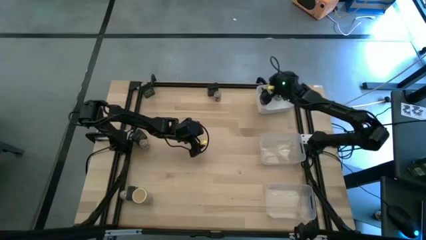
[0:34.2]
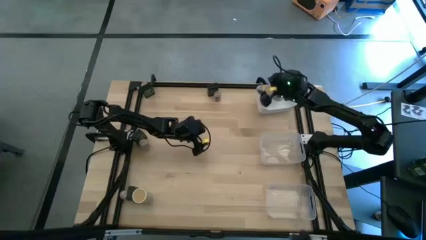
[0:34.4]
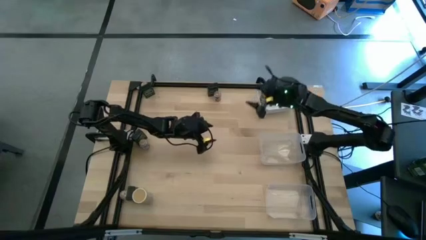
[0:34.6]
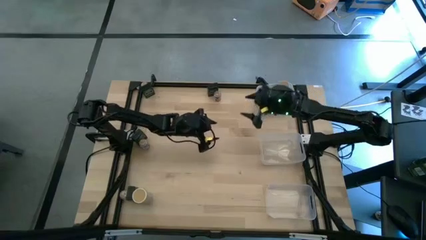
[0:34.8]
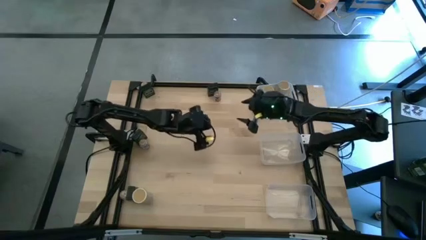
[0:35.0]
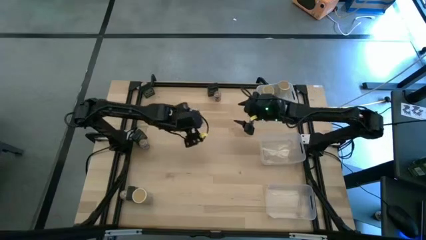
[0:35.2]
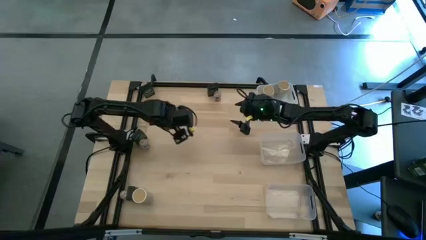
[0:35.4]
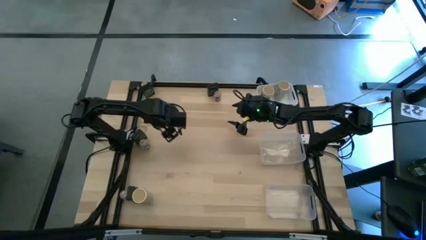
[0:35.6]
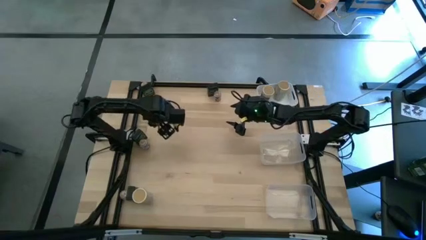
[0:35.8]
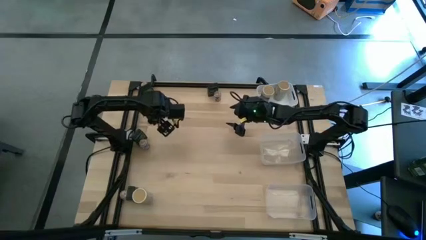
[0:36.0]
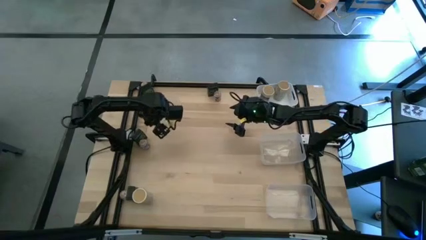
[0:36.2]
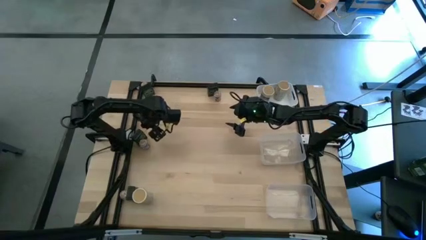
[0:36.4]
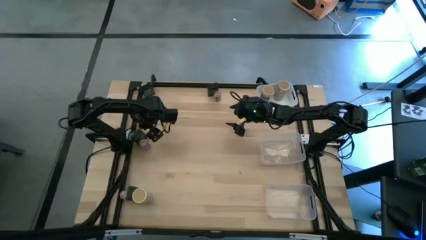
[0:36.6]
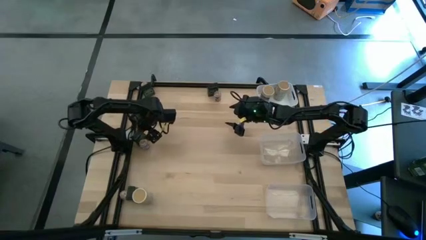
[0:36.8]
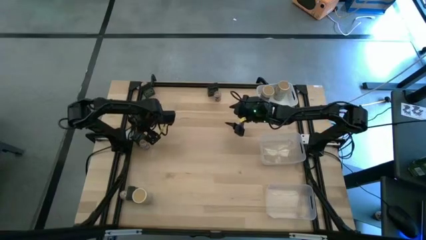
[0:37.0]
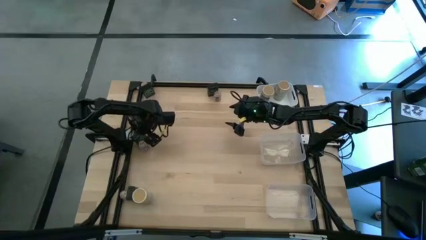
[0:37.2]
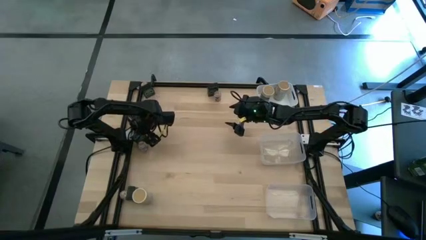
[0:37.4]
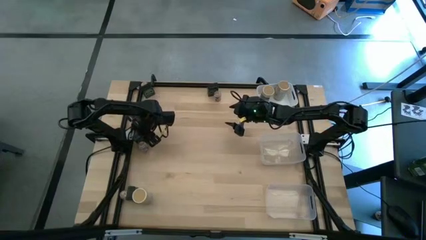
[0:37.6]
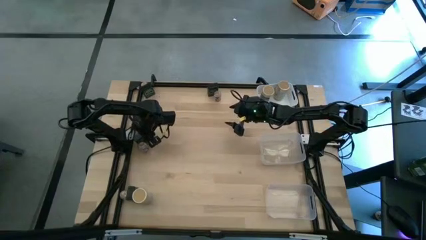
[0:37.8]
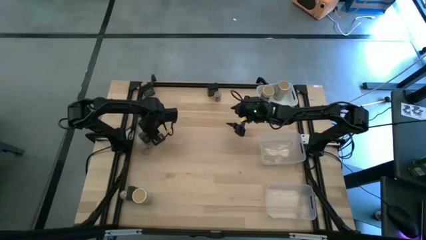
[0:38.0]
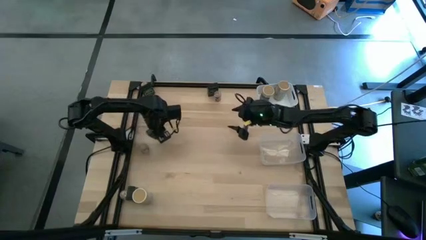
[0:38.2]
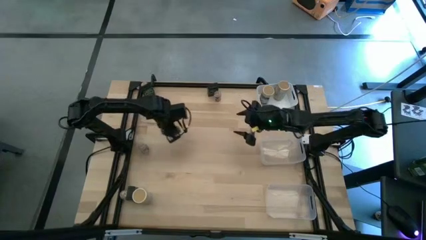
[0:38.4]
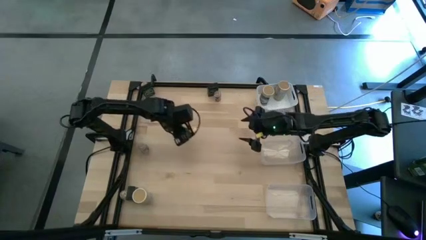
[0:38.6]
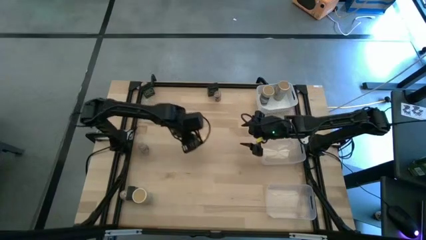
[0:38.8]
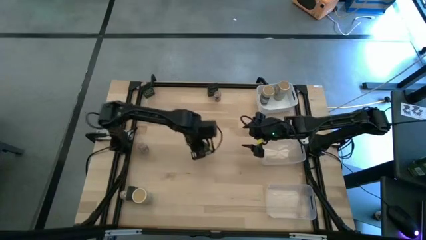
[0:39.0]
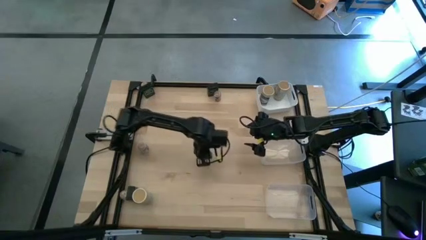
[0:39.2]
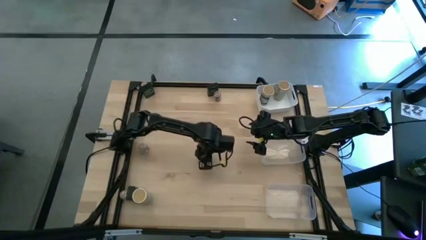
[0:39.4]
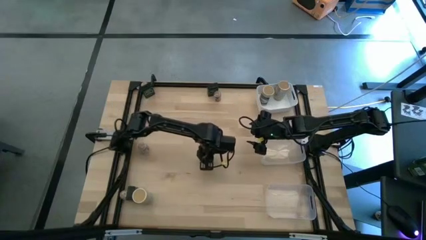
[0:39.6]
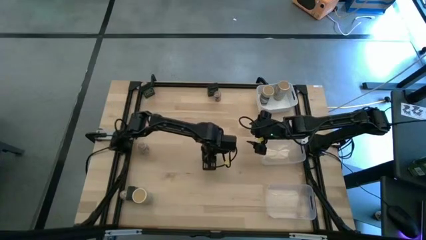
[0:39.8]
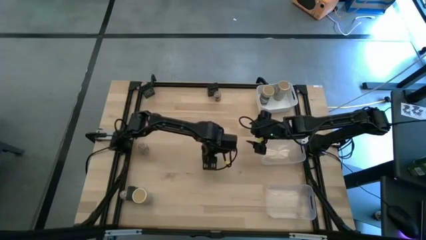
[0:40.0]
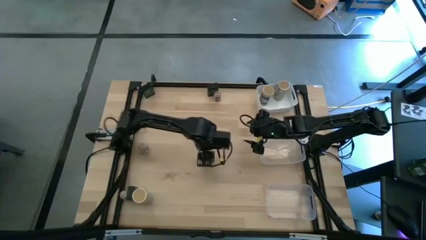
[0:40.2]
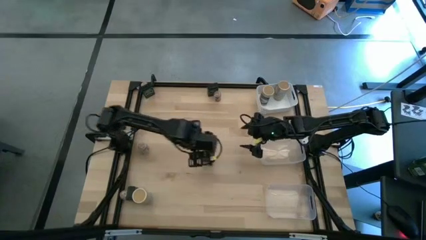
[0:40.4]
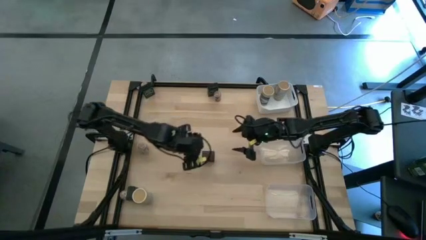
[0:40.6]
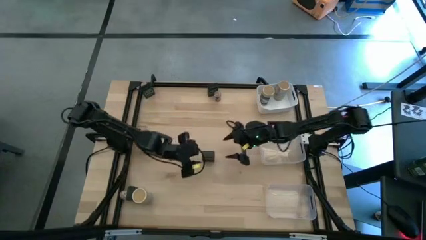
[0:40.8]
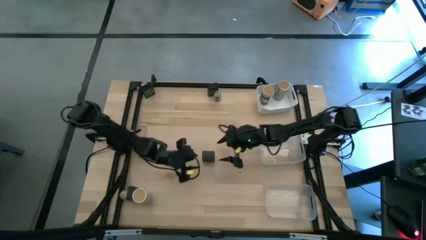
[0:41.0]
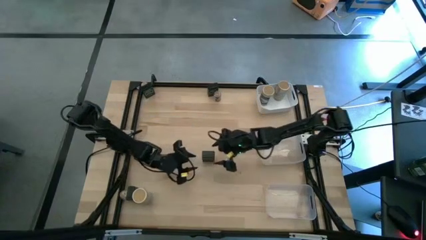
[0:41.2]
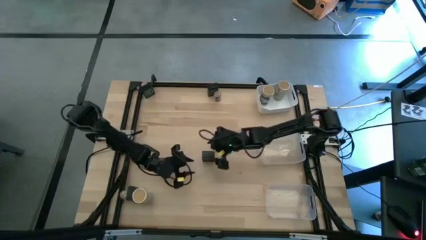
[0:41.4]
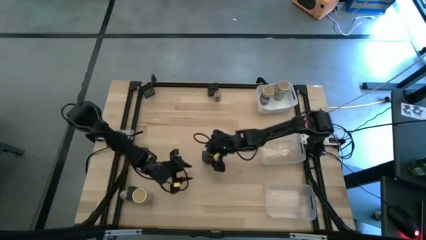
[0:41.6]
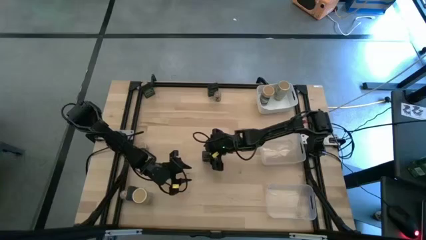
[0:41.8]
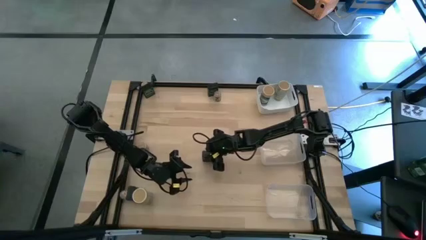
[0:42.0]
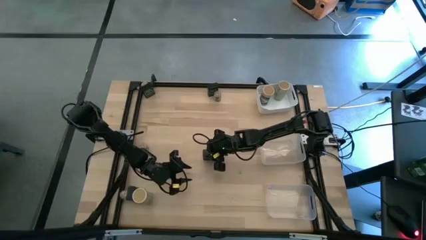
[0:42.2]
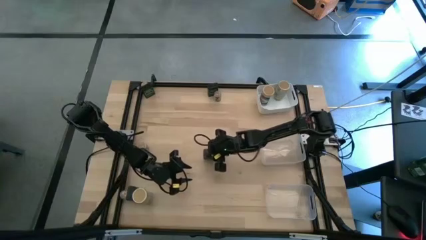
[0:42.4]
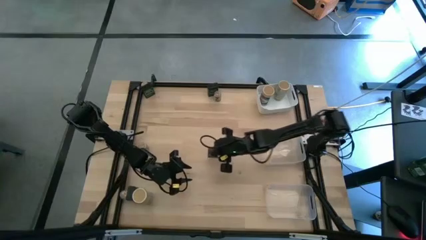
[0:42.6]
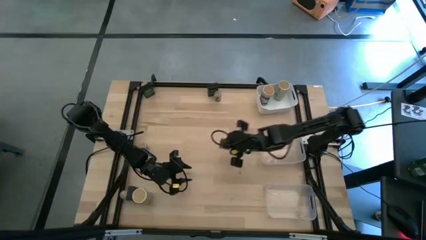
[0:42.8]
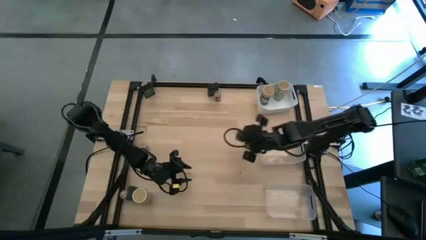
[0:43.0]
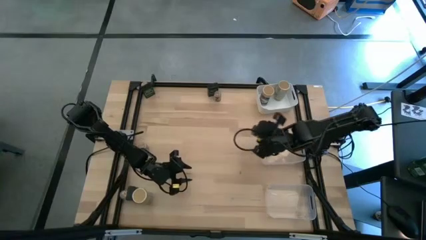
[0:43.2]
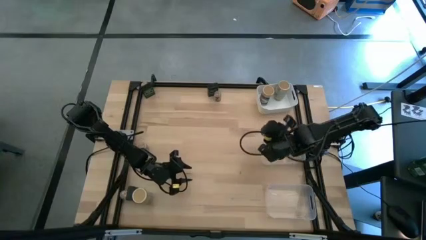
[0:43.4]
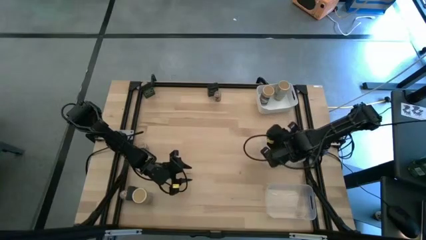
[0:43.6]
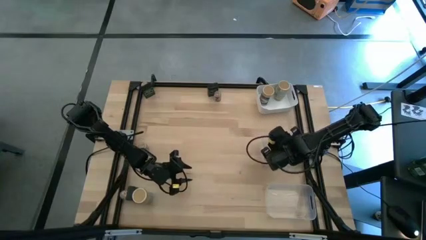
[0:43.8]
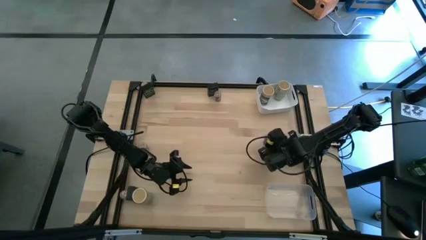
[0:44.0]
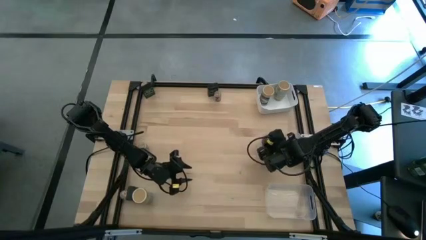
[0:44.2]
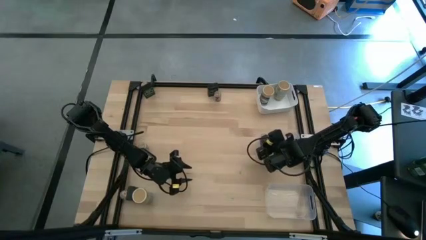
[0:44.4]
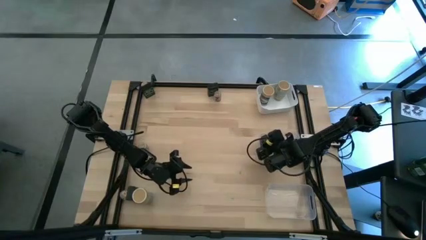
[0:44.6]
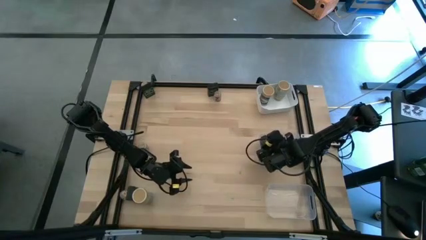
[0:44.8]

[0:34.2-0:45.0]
Task: Sort spices by type
Put the middle left black seasoning container into the top transparent bin

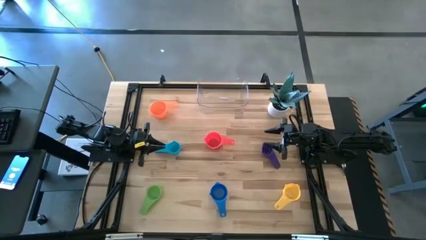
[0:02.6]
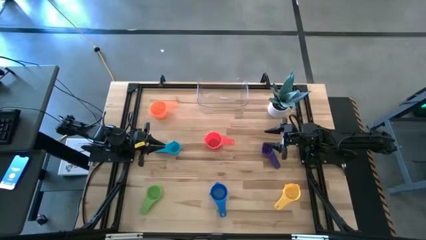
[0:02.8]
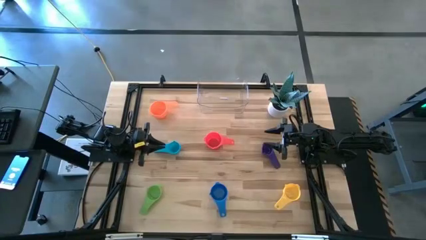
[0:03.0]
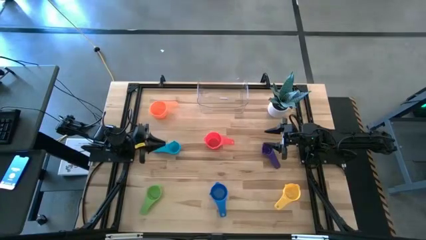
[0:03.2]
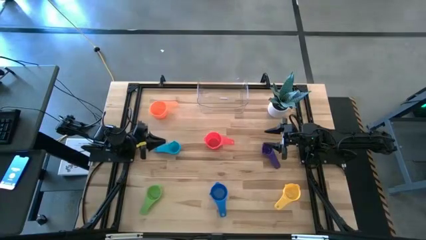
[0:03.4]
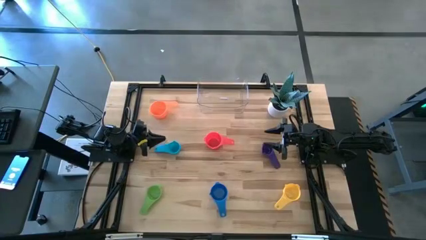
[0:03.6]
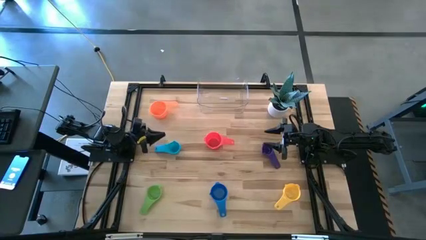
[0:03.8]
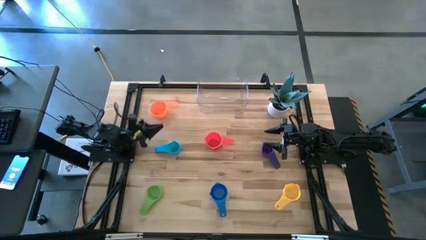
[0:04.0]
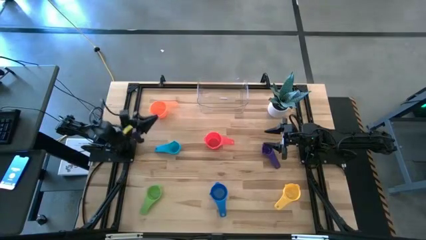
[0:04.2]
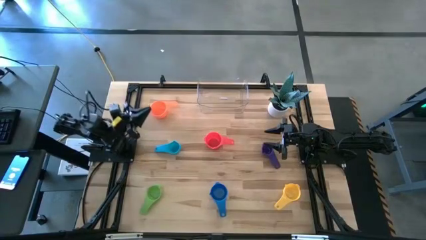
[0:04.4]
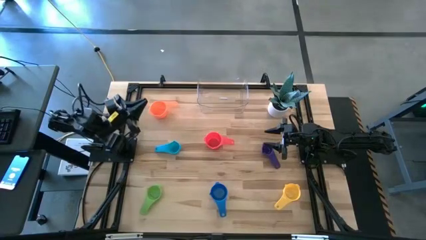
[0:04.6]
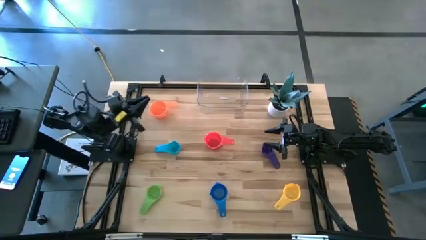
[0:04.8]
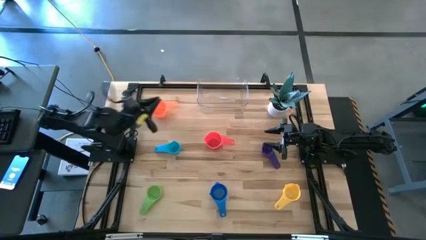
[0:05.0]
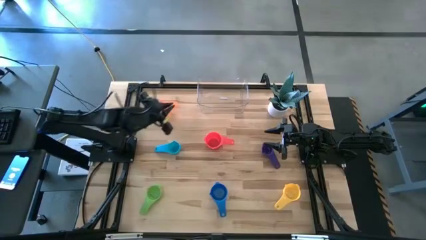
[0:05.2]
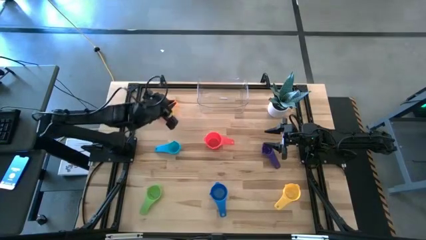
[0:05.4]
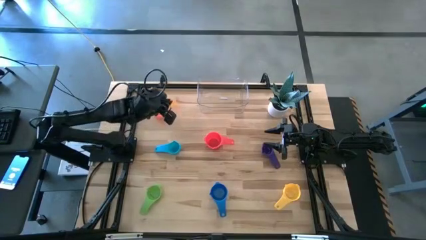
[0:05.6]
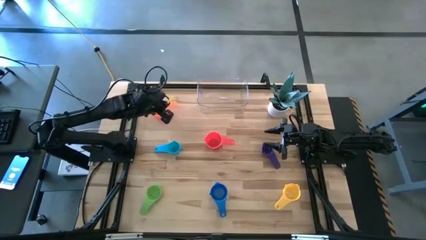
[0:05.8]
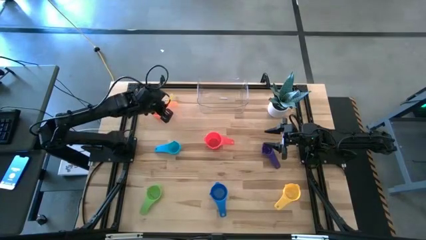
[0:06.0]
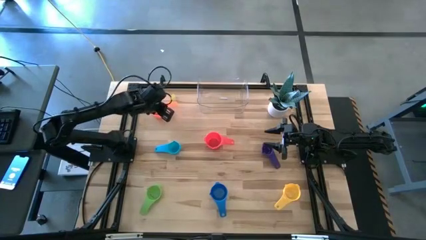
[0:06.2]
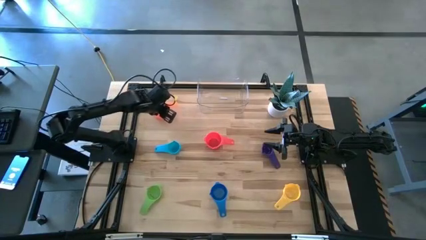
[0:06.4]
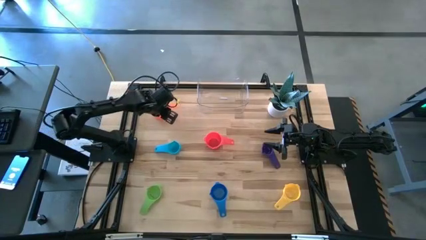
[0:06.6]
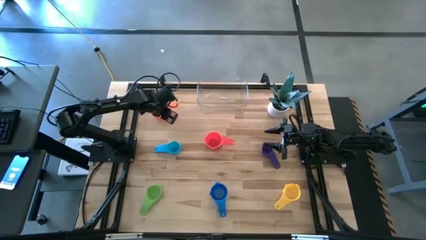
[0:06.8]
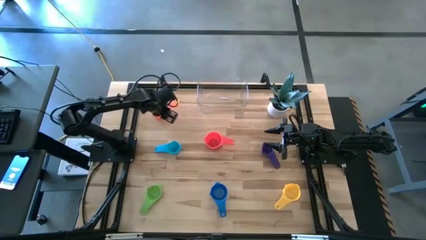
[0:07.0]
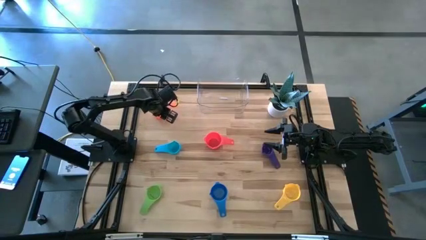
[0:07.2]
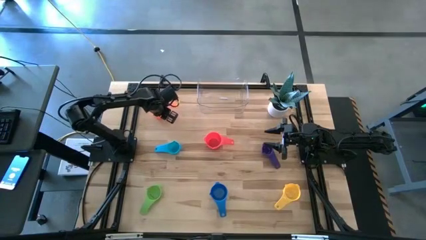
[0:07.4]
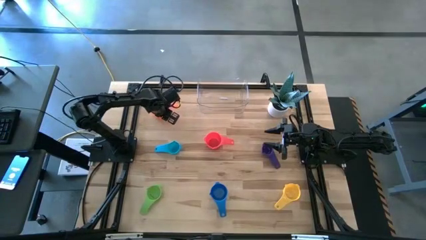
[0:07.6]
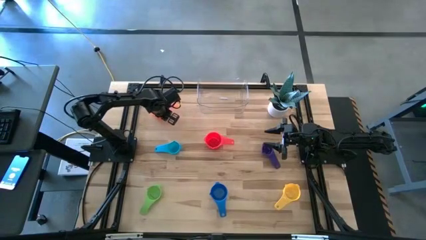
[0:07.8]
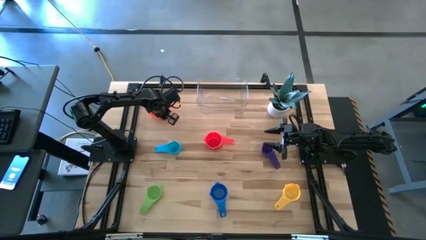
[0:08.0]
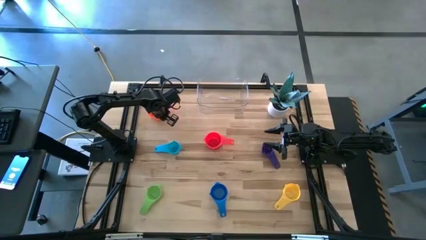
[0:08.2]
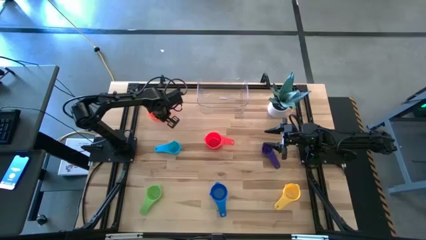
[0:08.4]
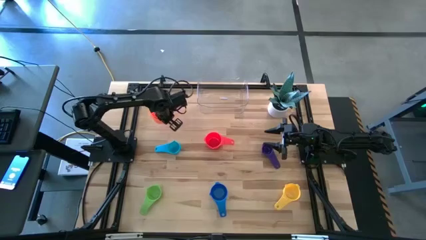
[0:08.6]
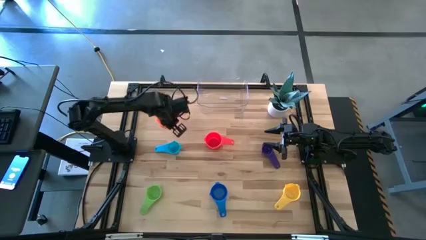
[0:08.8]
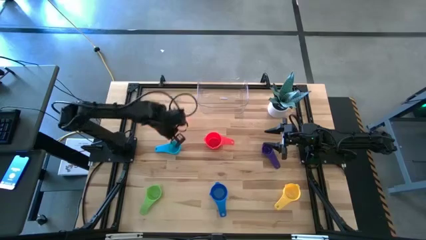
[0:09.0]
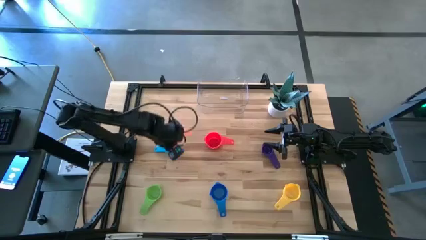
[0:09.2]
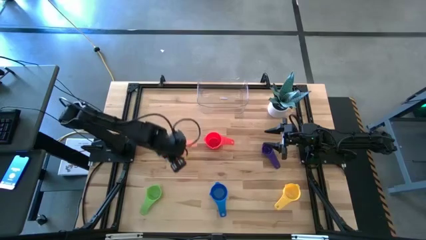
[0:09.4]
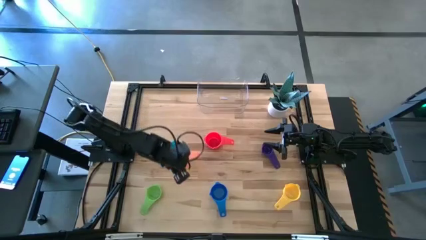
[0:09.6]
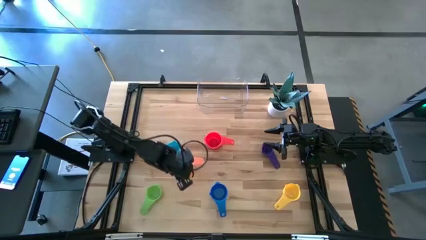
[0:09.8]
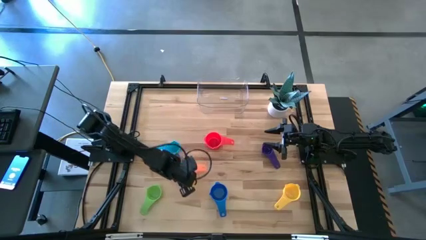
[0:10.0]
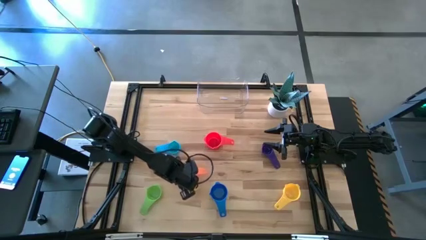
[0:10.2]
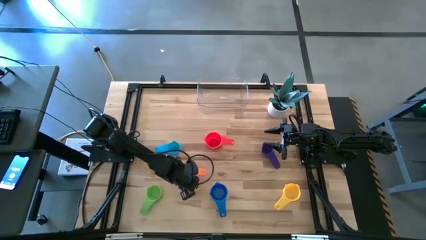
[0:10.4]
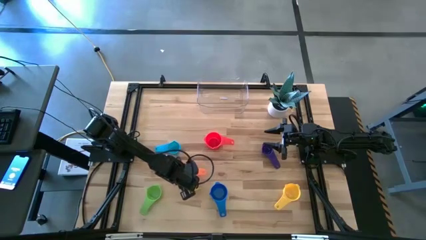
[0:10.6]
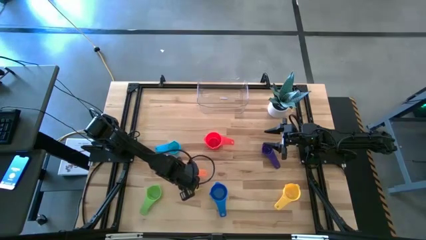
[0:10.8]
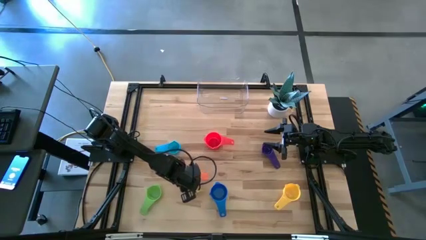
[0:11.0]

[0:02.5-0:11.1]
Task: Nest measuring cups in basket
Move the orange measuring cup to the center of the table
